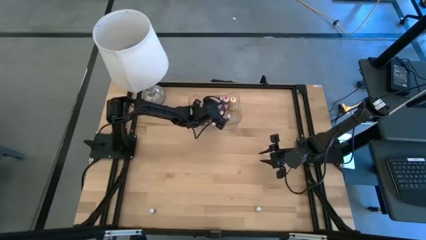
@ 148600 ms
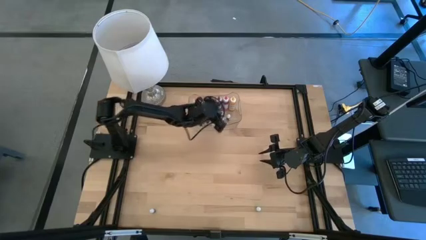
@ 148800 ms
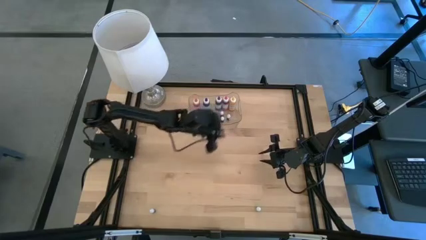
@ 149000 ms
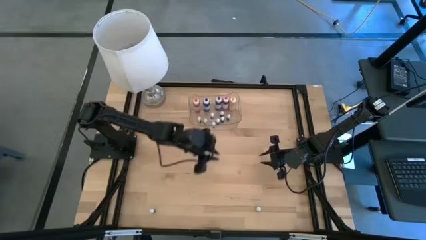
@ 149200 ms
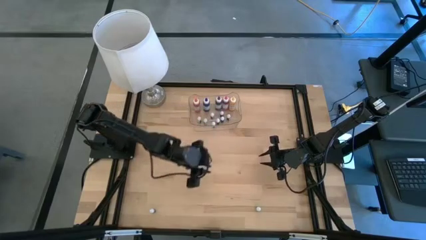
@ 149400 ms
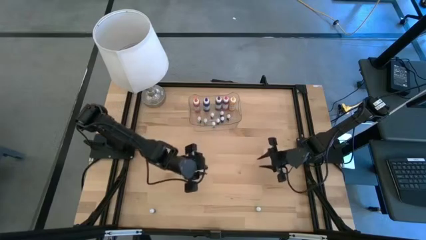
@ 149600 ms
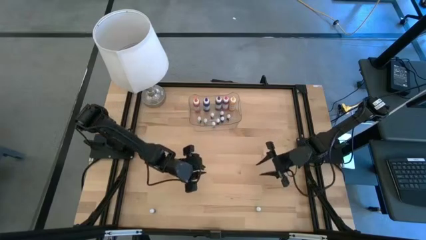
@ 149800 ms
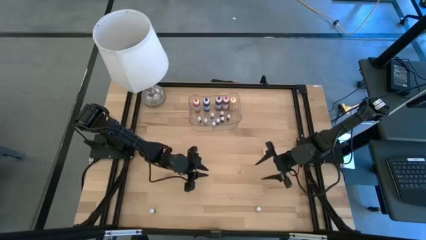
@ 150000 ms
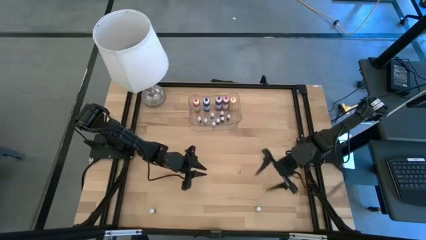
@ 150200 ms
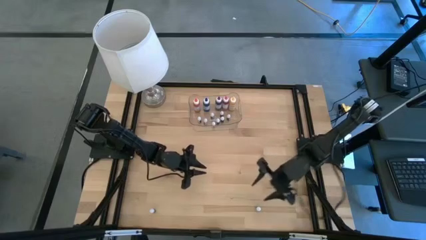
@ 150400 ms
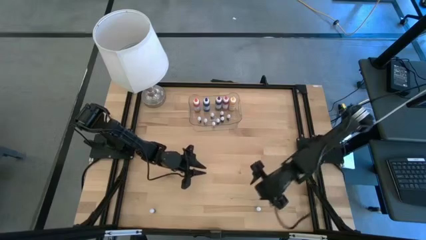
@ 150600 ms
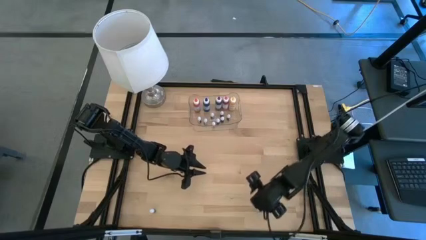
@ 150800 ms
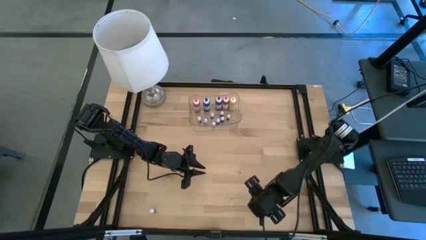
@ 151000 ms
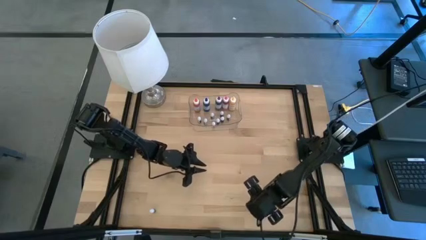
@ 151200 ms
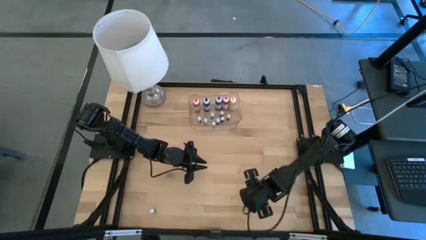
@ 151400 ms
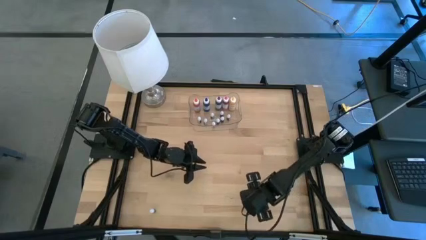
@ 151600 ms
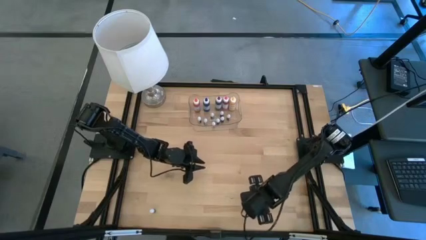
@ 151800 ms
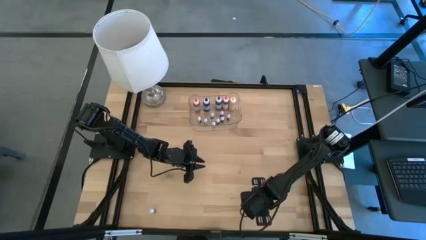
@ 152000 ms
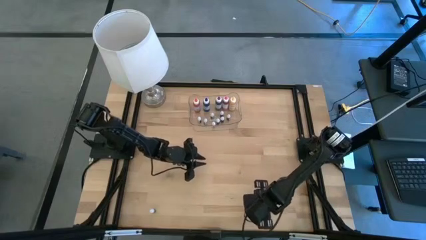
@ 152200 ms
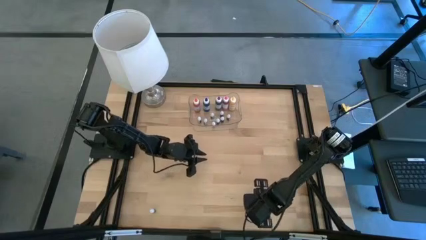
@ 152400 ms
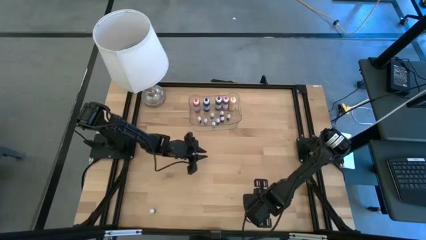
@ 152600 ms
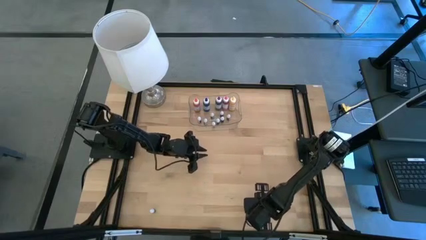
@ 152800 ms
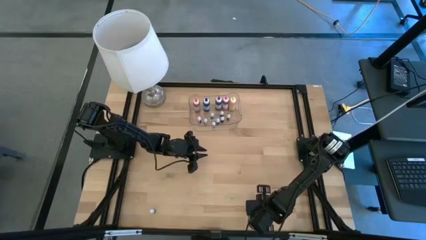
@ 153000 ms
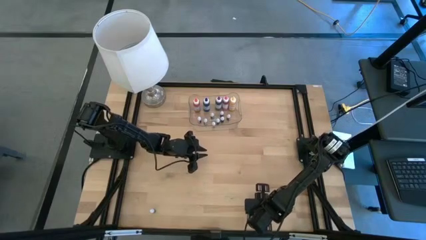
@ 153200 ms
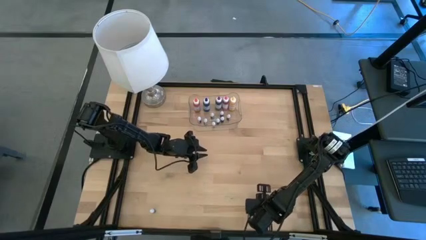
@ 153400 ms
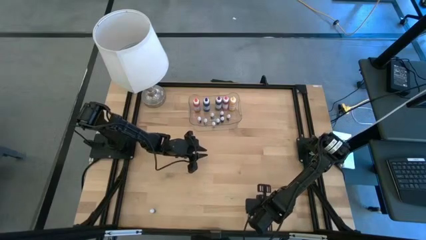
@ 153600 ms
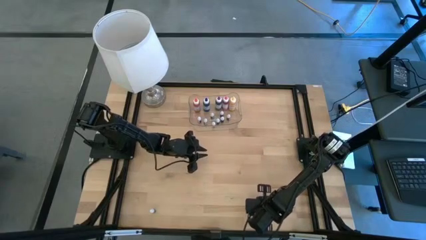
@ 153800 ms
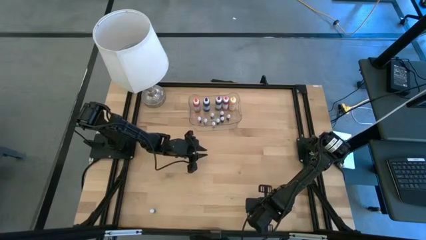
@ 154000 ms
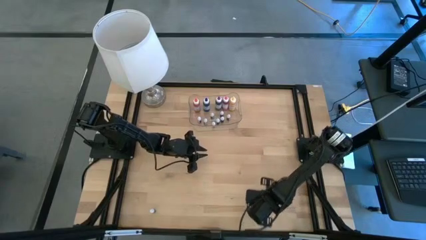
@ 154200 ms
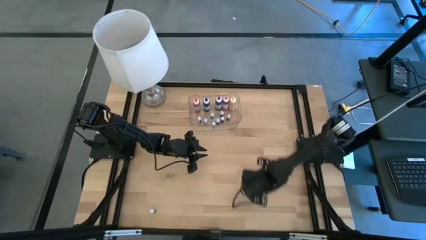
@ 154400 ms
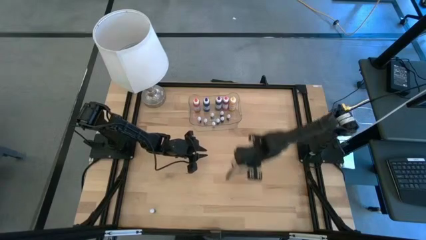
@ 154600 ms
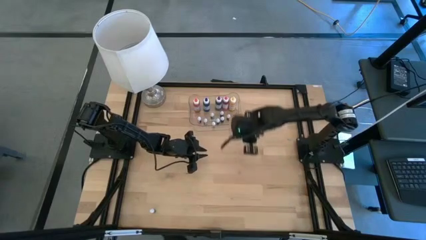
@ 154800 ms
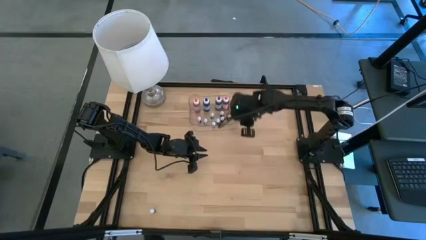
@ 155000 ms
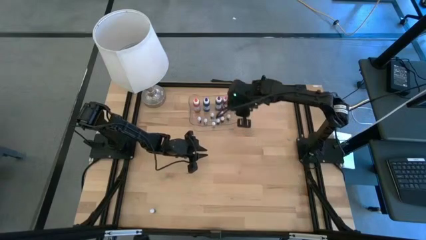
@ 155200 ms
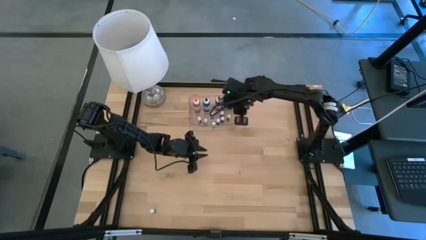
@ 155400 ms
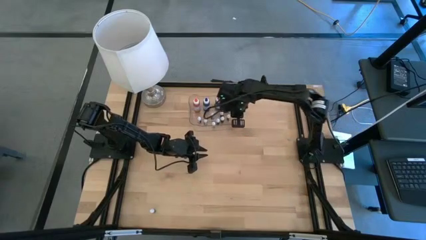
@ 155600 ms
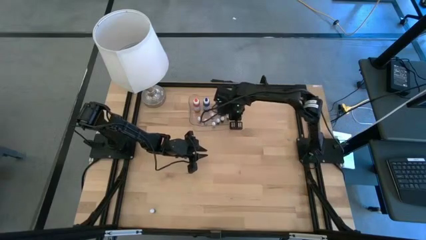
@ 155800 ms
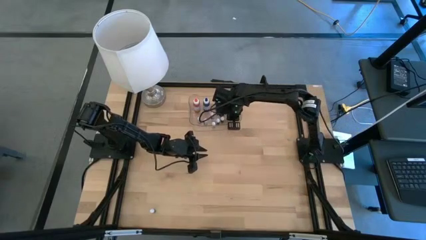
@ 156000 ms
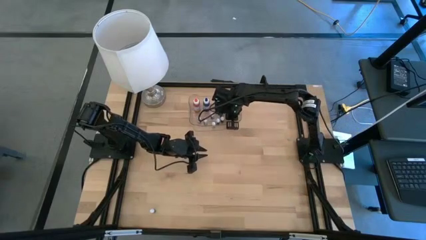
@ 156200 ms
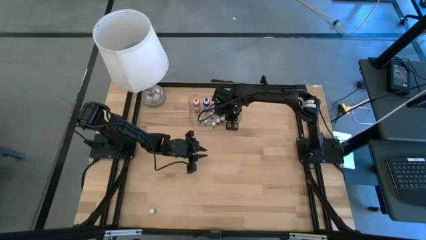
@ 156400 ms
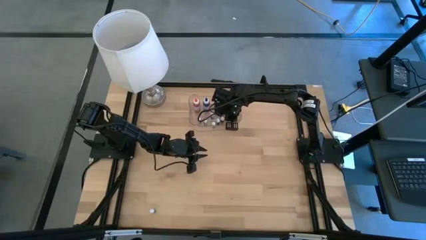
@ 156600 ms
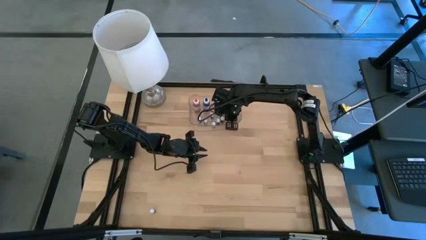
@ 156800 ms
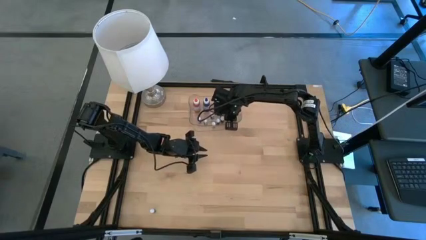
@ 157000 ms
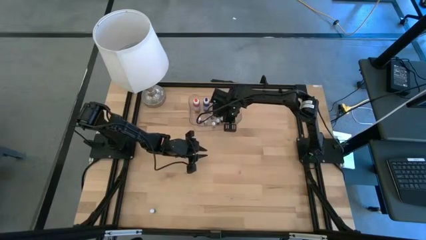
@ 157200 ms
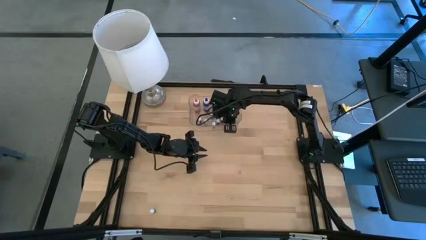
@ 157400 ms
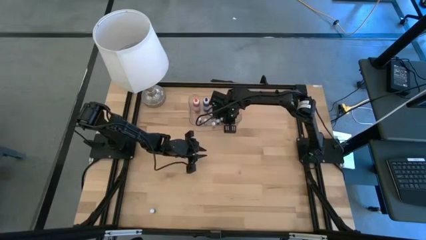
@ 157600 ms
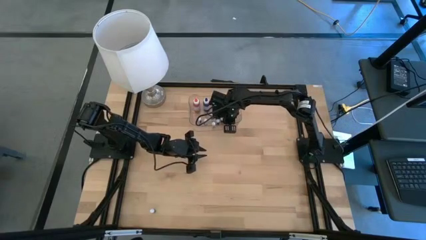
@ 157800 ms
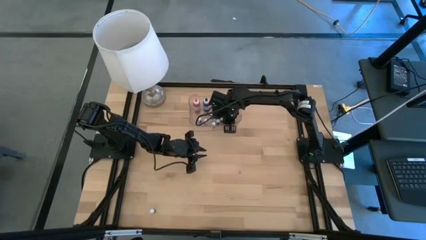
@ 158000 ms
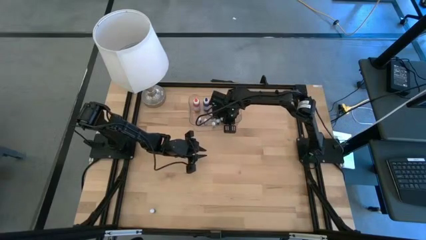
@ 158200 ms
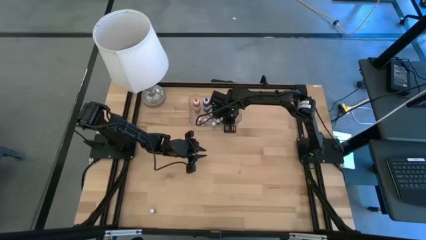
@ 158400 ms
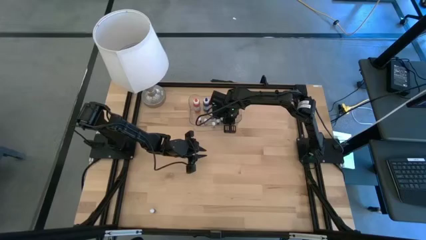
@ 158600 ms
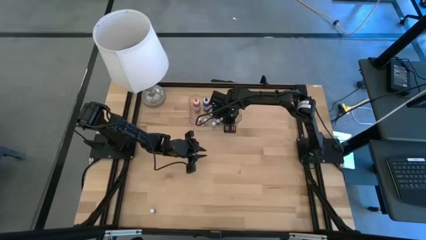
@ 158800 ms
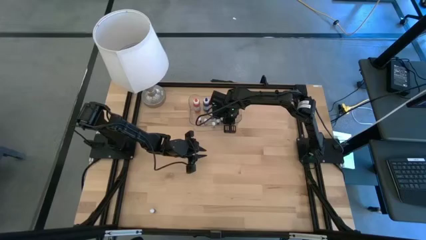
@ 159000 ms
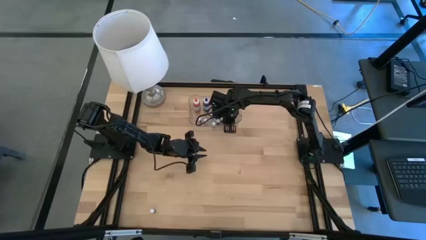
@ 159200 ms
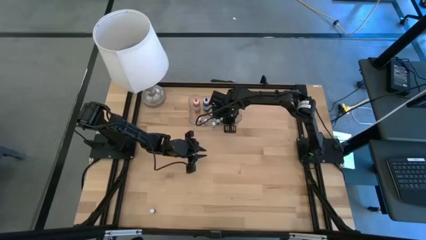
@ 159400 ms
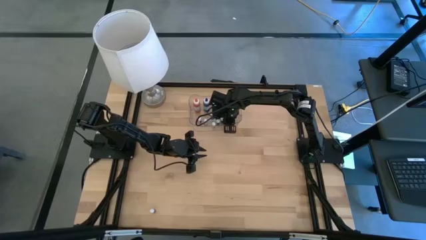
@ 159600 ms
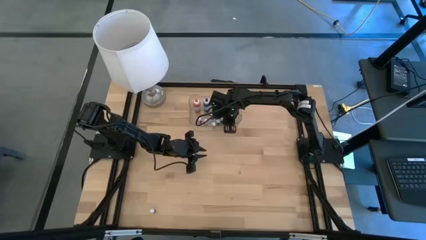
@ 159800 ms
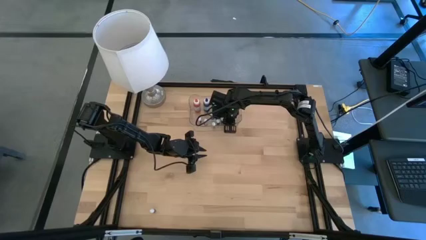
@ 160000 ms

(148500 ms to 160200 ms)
Task: Pick & Place food coloring
Put the small blue food coloring bottle into the transparent bin

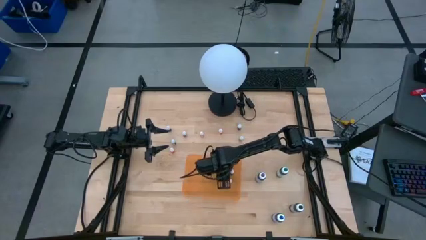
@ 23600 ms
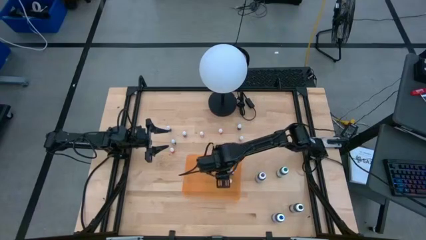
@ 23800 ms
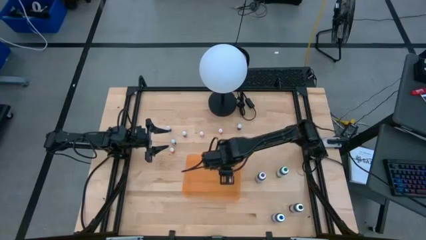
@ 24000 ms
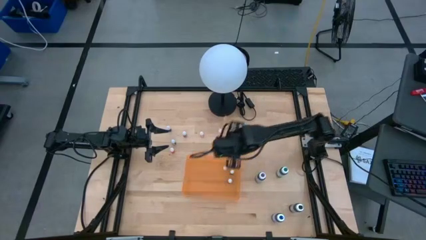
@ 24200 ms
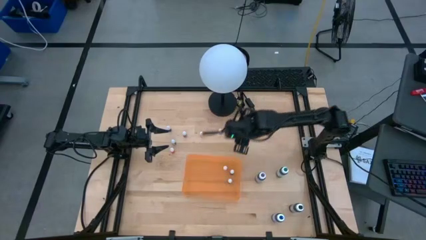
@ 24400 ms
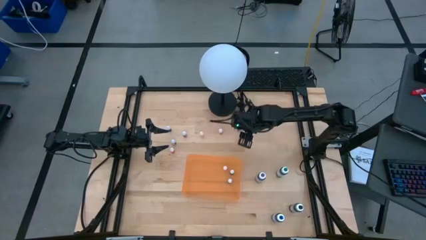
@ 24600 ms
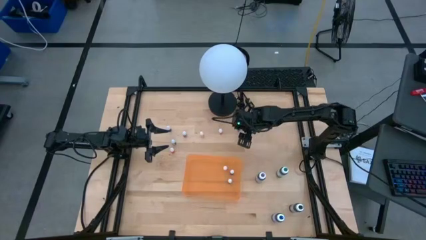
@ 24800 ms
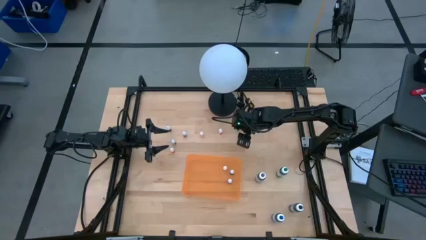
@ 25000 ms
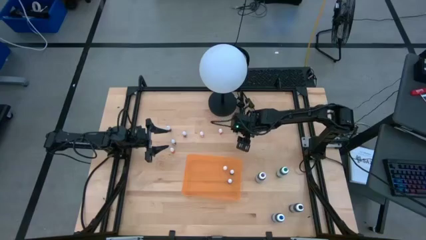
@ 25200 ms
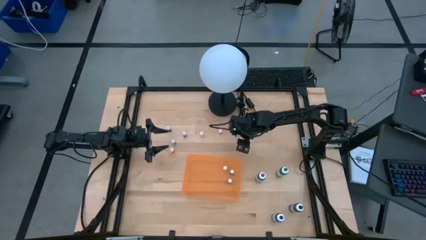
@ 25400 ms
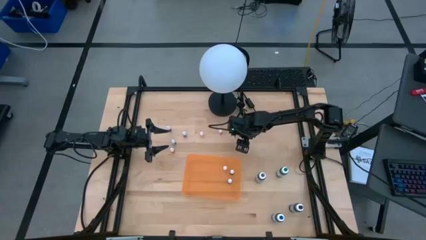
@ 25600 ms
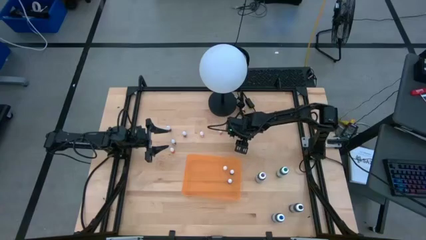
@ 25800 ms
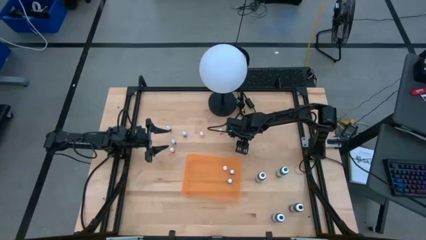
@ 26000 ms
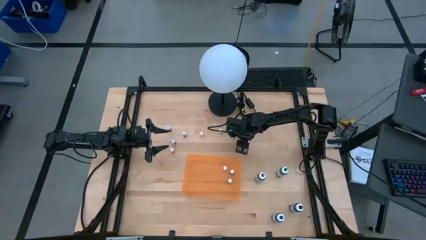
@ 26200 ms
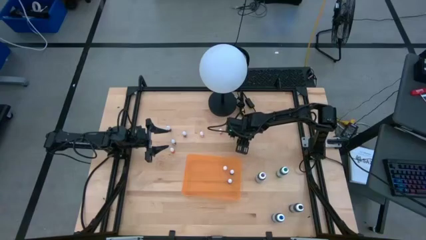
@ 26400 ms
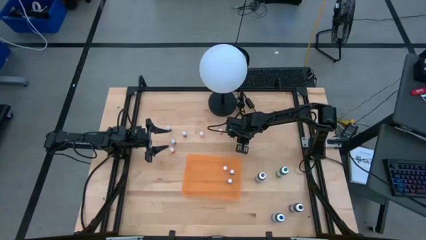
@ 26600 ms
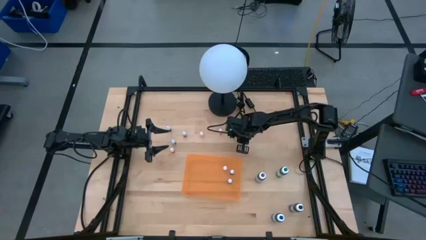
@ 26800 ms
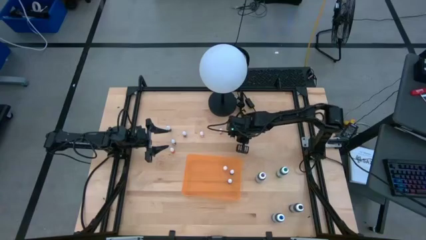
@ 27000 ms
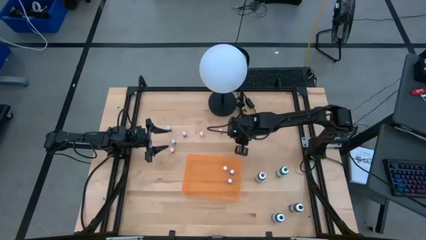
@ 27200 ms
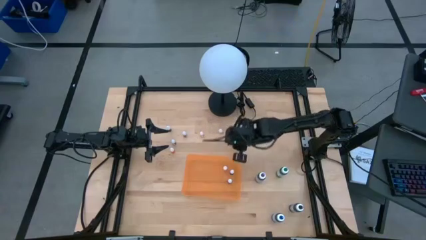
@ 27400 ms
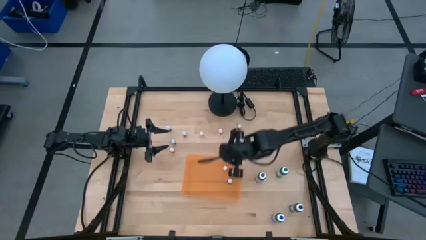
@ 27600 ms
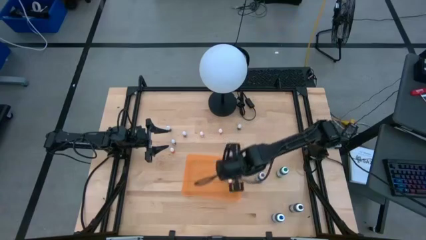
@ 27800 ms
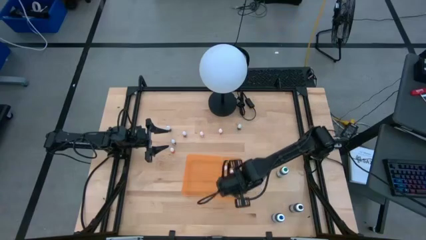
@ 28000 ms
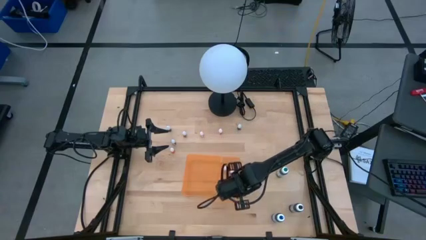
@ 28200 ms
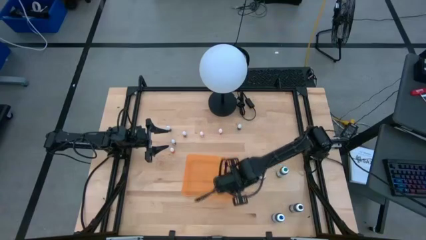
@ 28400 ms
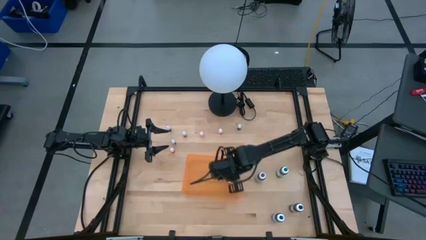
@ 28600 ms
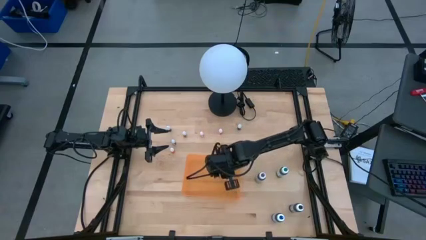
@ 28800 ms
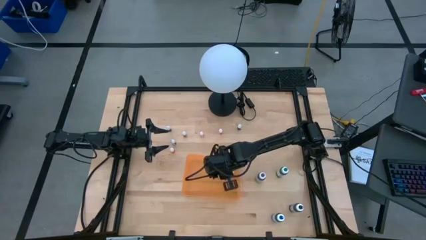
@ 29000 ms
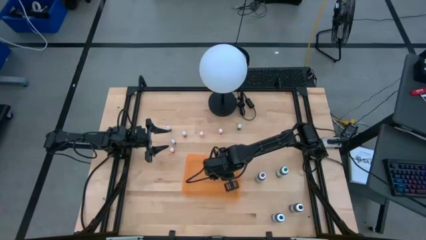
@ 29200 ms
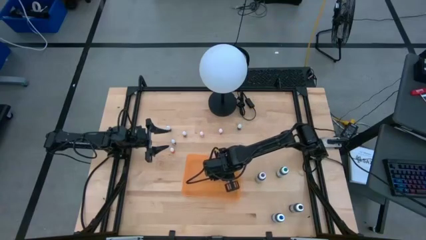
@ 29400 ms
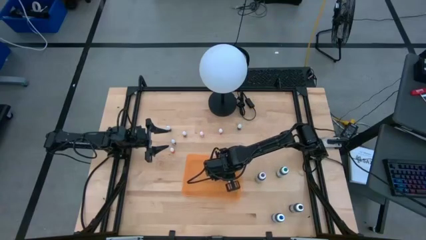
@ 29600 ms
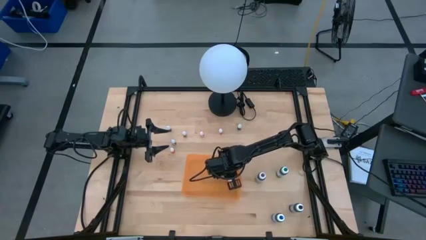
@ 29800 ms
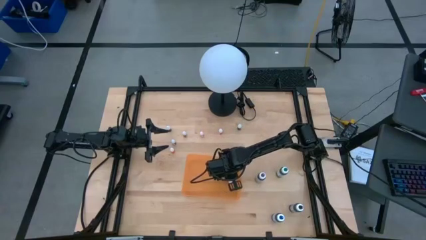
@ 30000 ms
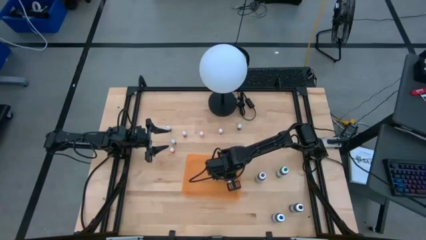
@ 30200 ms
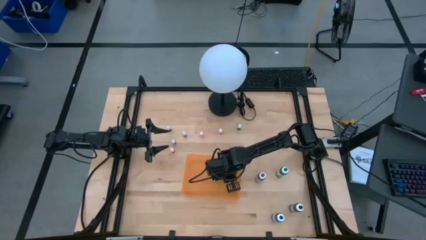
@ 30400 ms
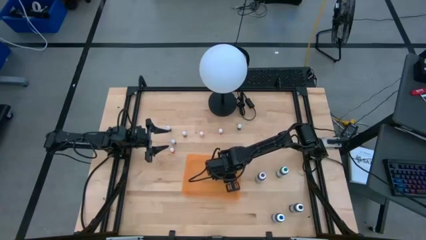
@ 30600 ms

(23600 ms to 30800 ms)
Task: Pick & Place food coloring
Put the small green food coloring bottle into the orange container
